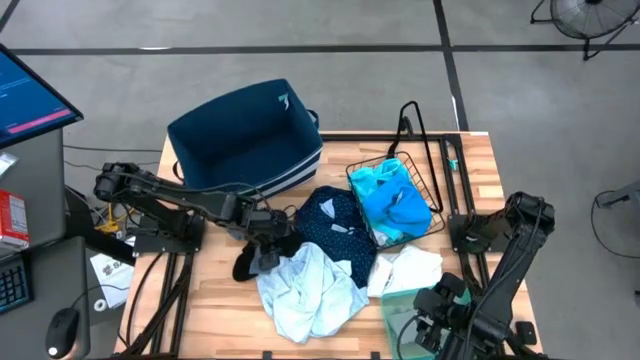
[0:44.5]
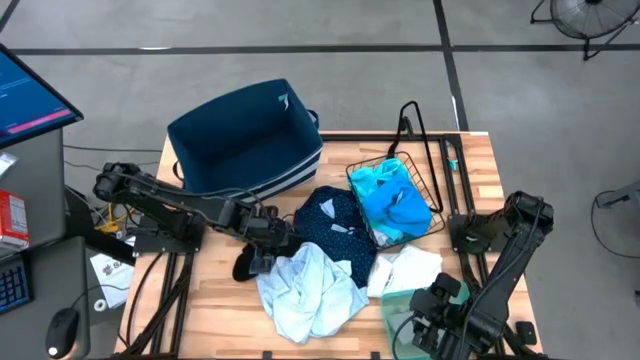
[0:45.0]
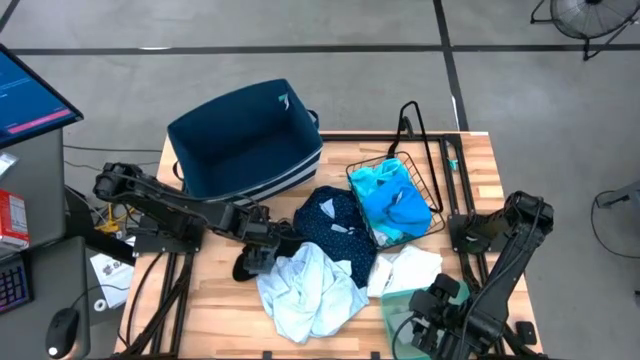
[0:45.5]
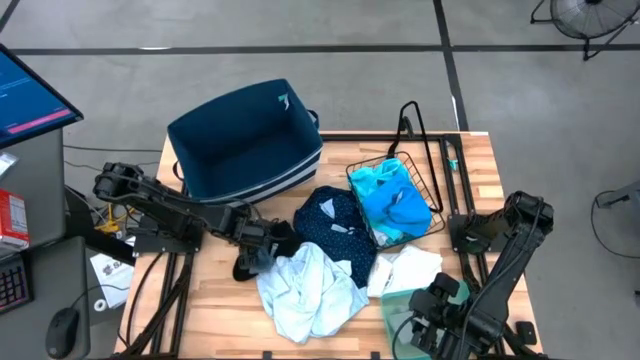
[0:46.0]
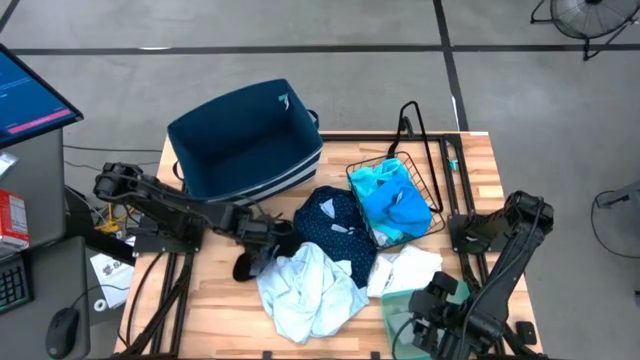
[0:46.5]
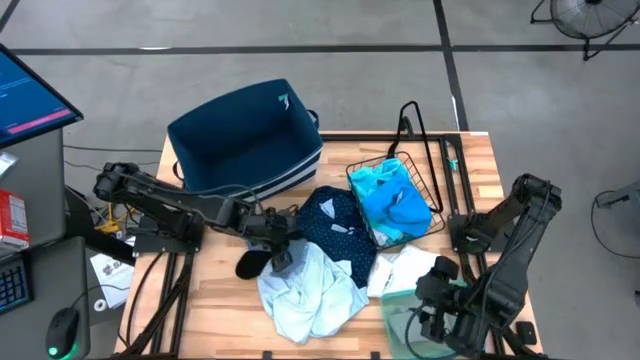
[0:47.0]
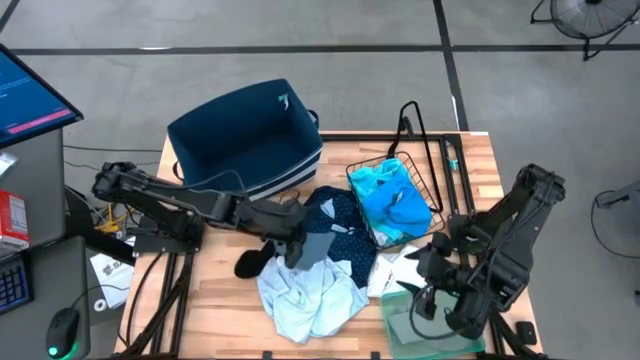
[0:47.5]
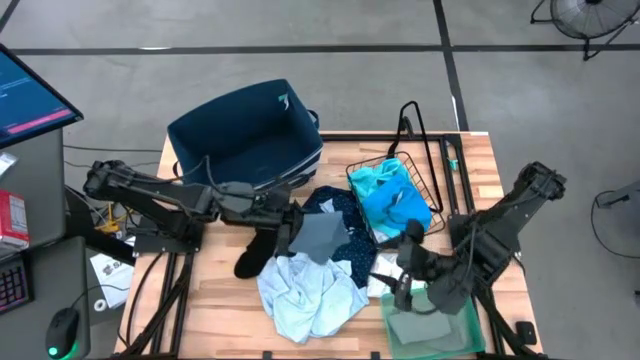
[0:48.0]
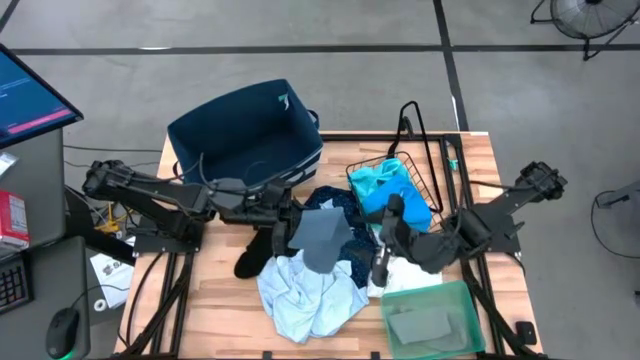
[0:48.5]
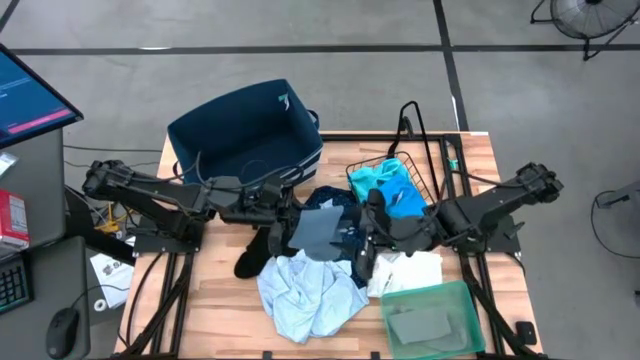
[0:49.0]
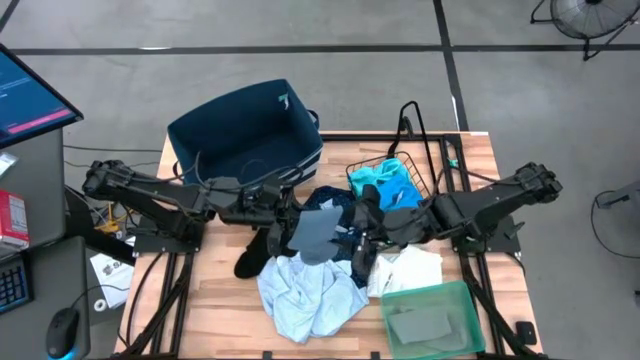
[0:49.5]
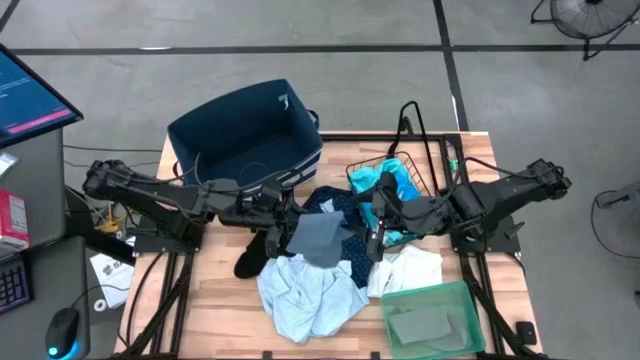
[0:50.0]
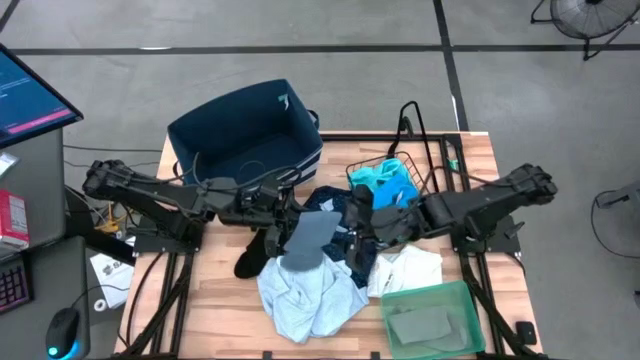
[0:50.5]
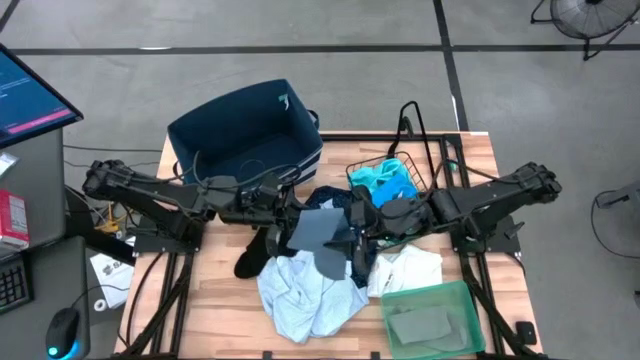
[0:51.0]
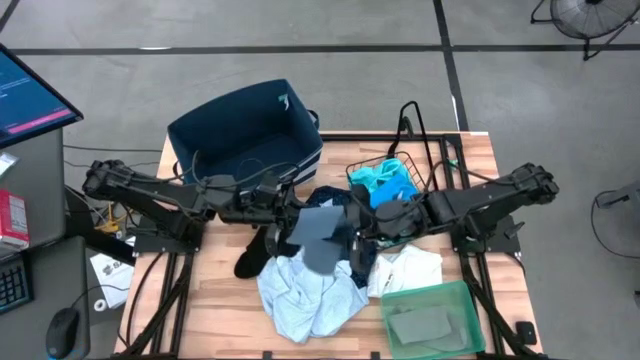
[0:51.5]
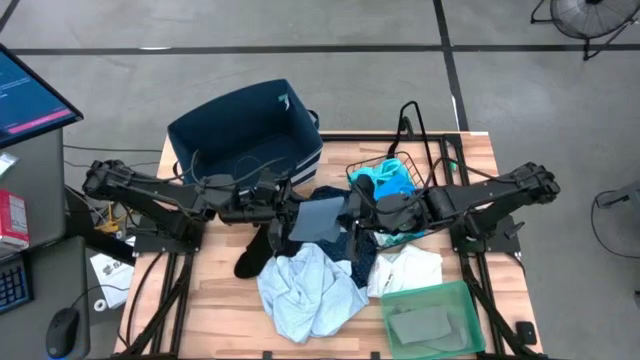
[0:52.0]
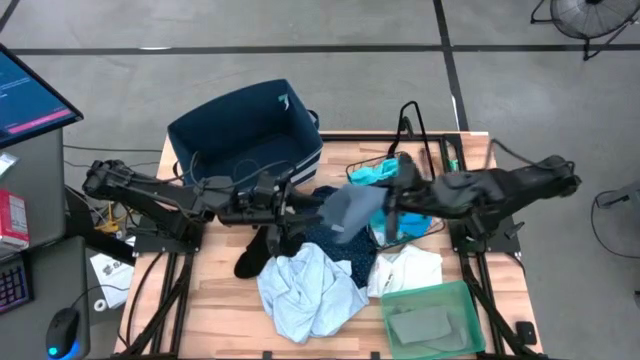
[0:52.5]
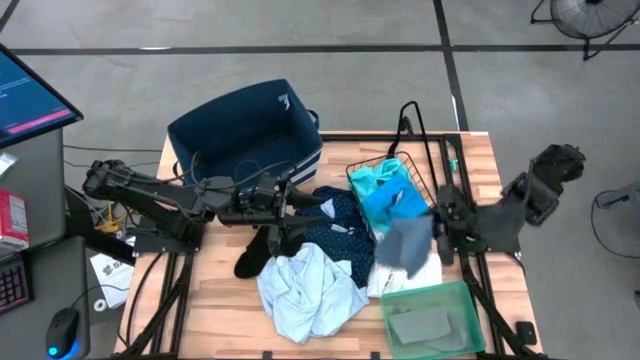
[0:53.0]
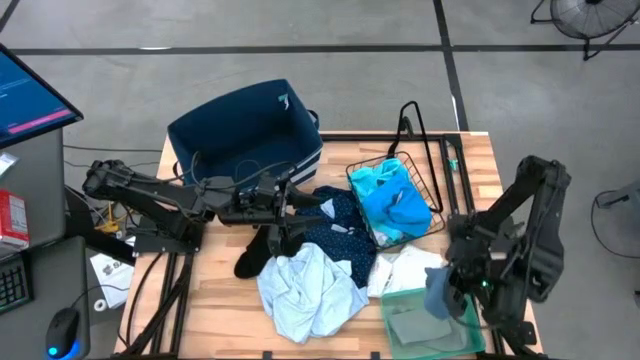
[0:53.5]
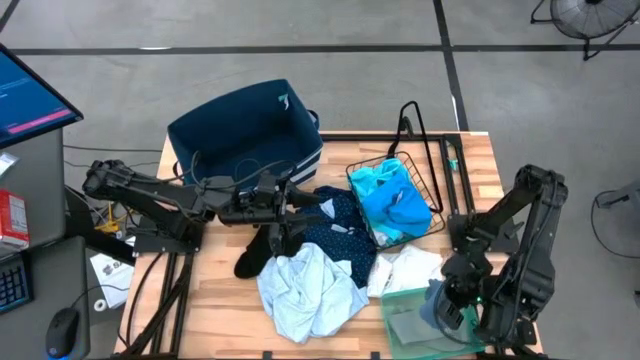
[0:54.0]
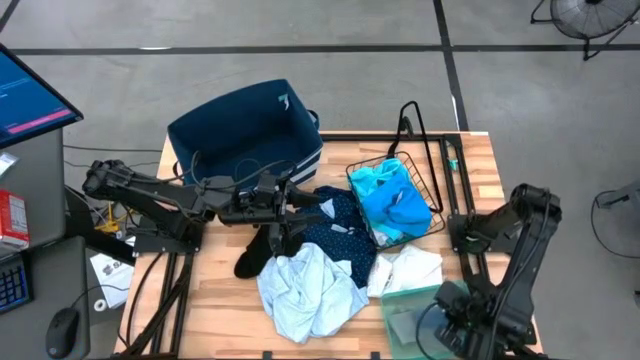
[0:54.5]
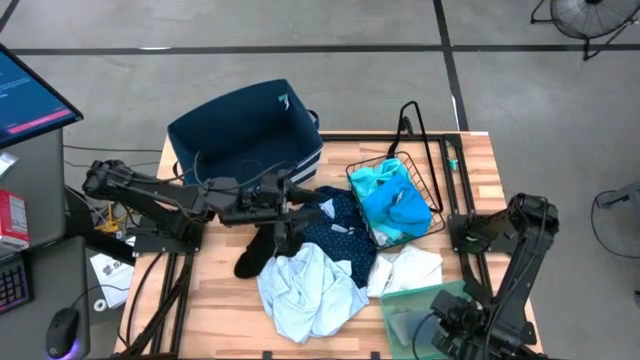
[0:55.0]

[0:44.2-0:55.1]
Task: Pick & Place Cloths
Put the blue sock into the green bin

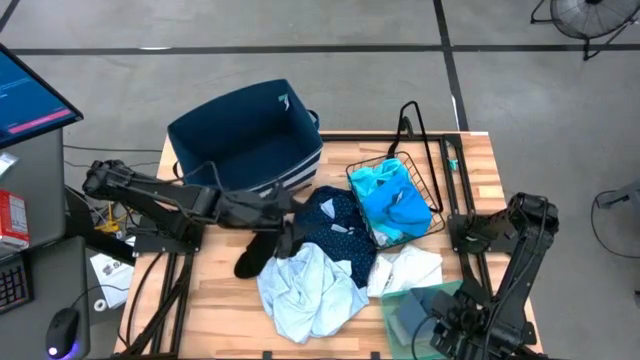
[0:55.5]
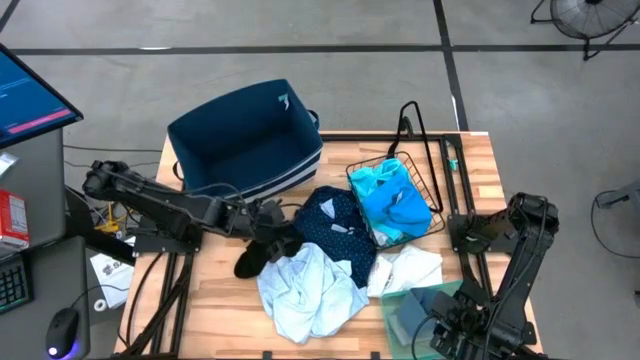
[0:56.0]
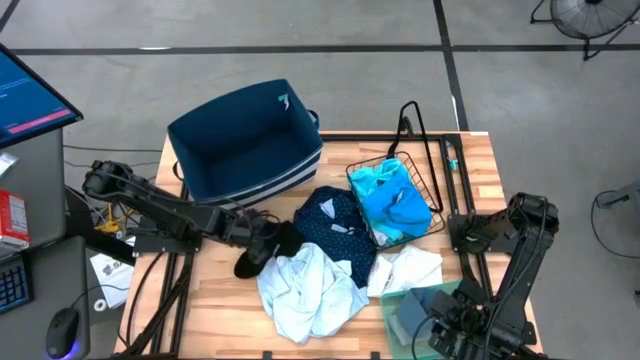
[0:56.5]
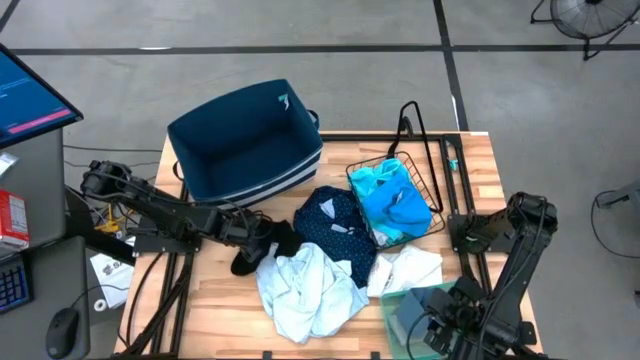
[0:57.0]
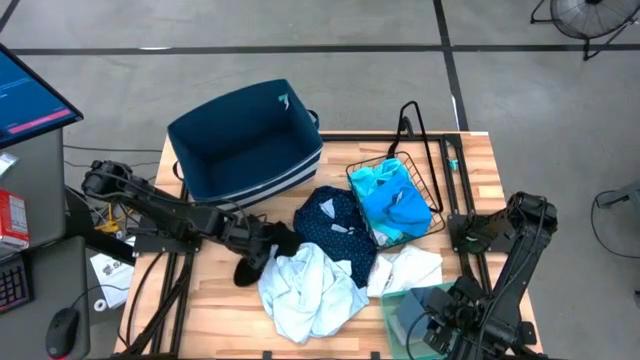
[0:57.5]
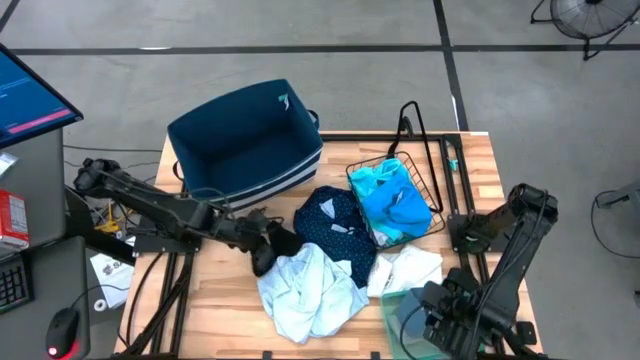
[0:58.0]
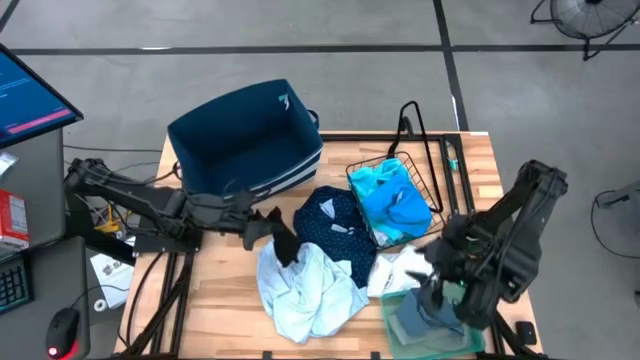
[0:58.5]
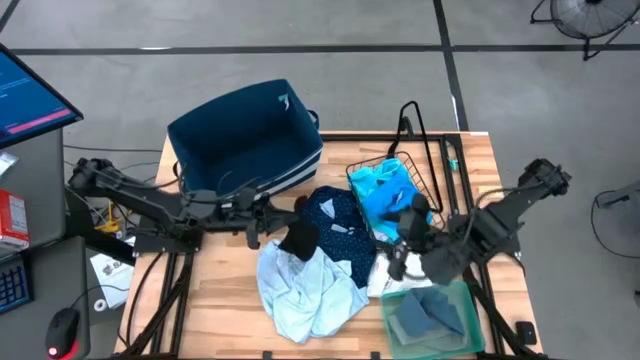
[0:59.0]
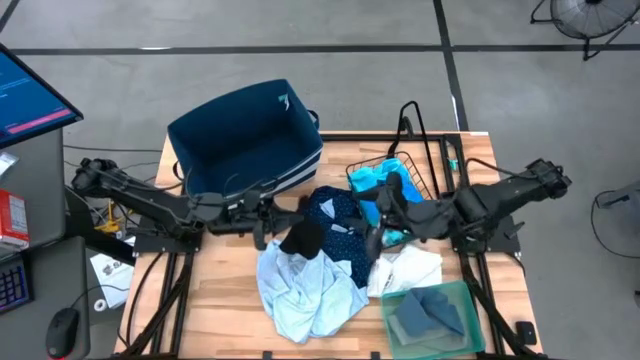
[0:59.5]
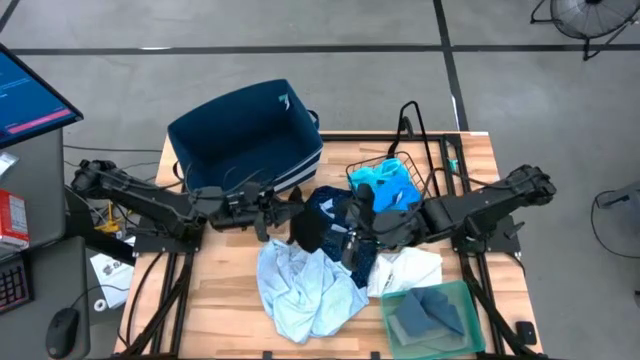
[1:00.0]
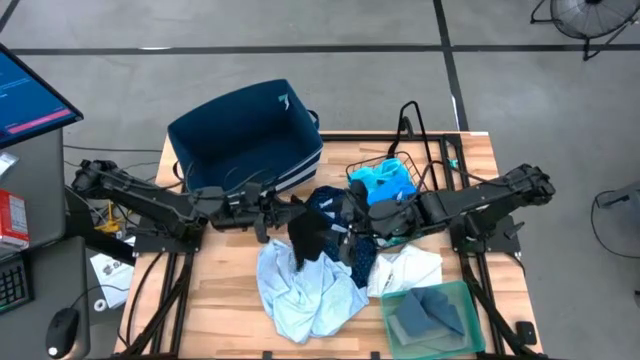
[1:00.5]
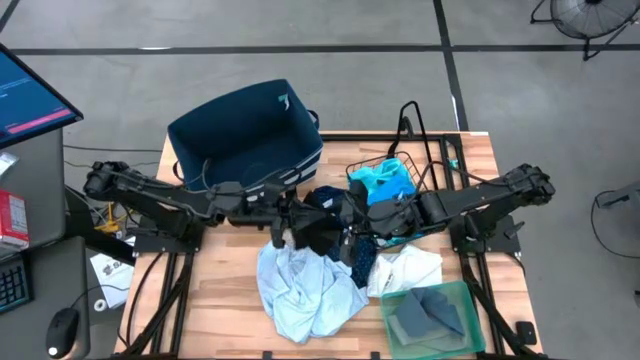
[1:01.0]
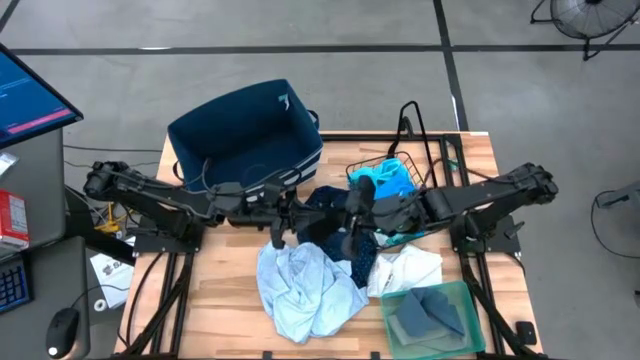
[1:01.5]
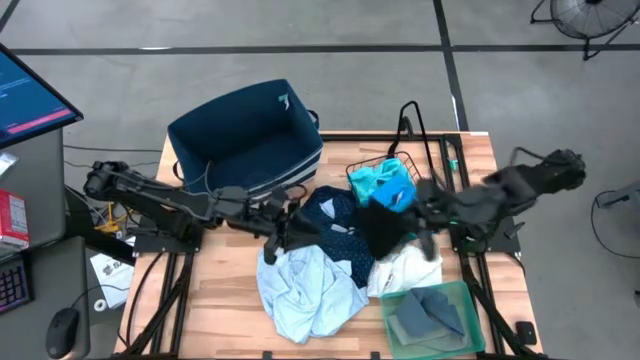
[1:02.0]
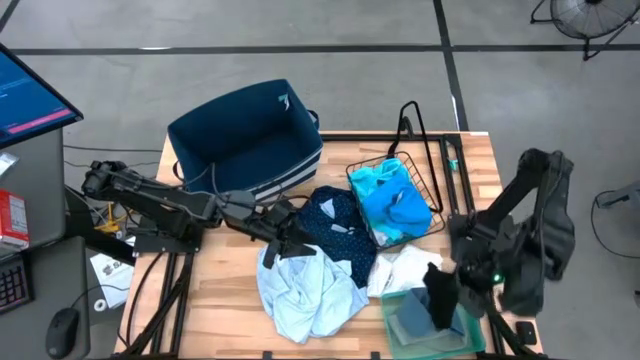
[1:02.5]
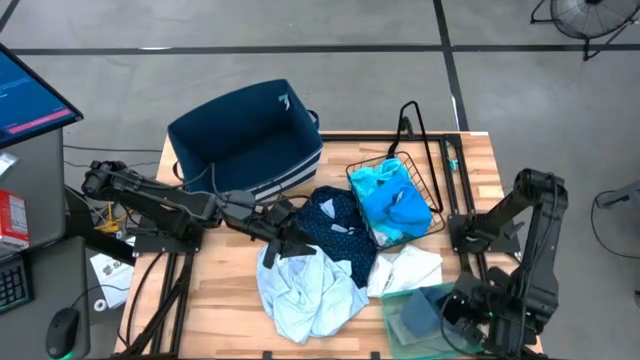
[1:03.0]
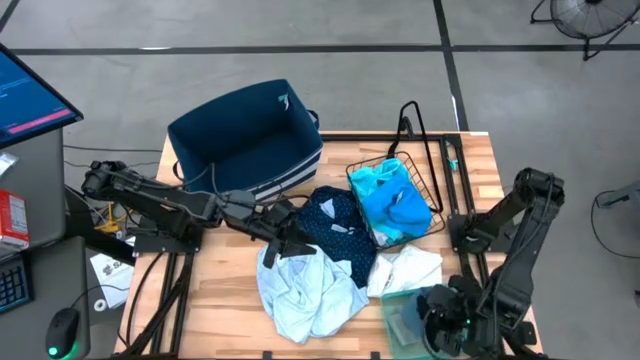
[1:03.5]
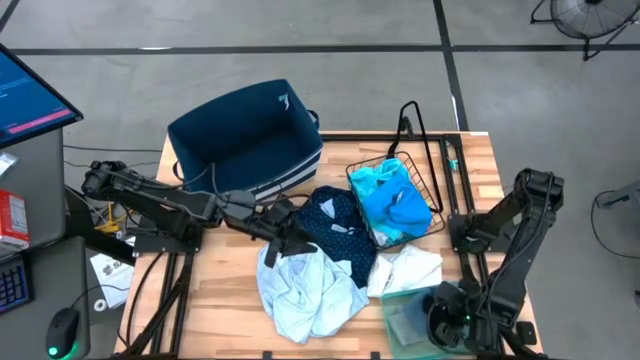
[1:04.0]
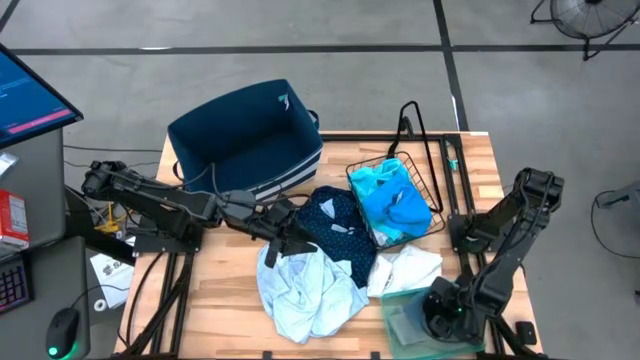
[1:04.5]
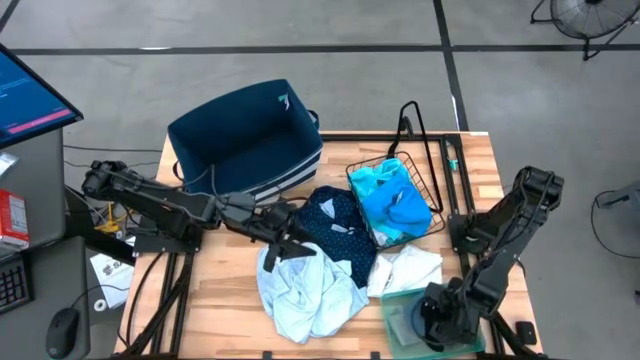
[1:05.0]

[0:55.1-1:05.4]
Put the black sock into the green bin
